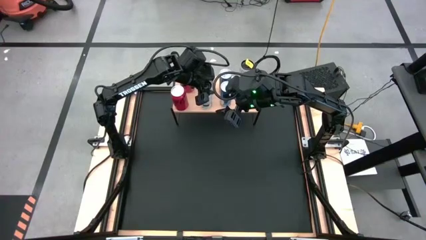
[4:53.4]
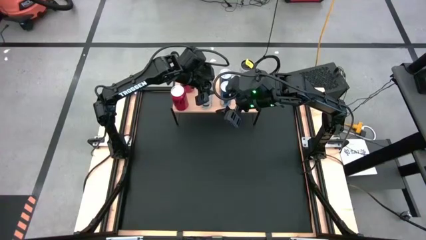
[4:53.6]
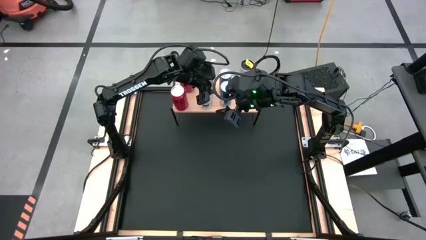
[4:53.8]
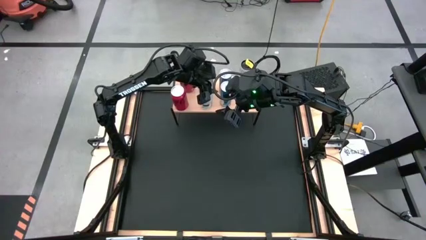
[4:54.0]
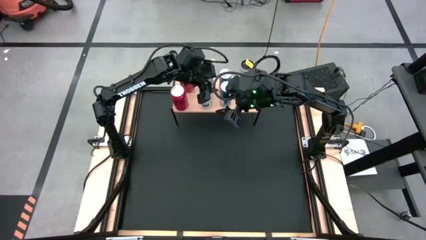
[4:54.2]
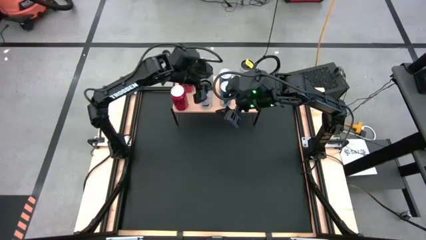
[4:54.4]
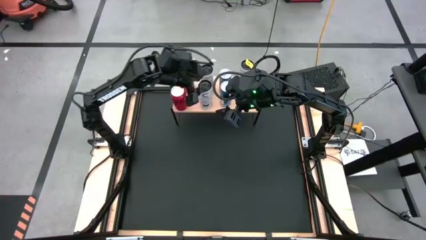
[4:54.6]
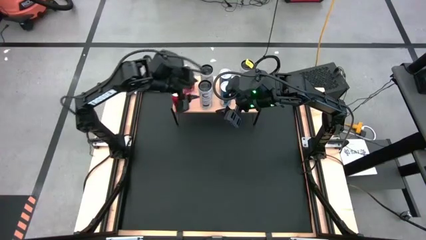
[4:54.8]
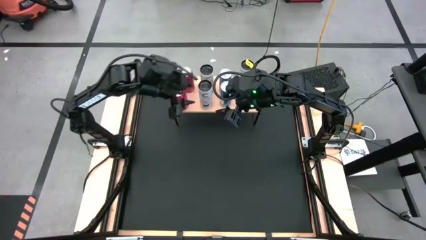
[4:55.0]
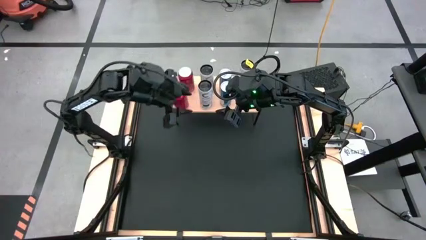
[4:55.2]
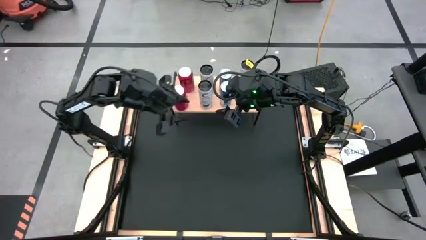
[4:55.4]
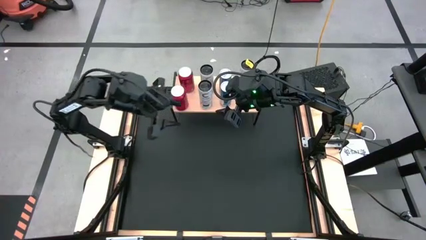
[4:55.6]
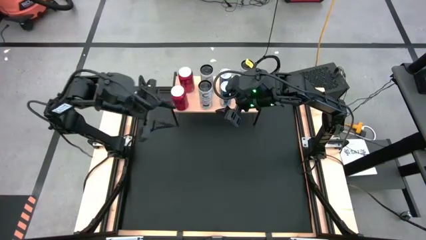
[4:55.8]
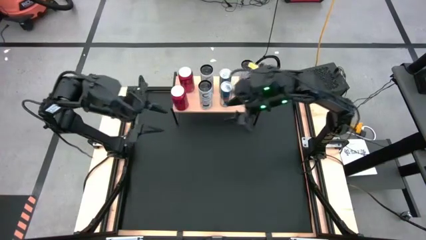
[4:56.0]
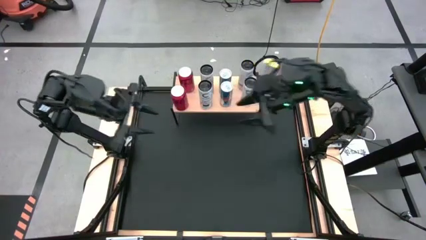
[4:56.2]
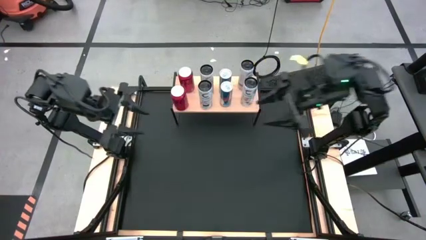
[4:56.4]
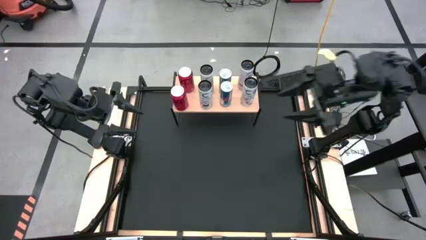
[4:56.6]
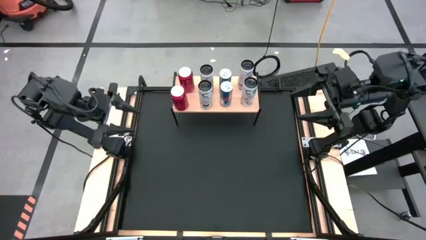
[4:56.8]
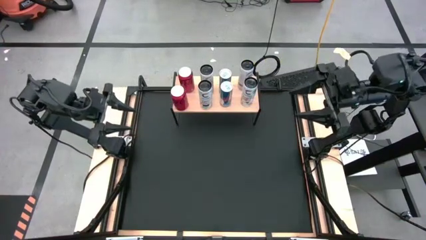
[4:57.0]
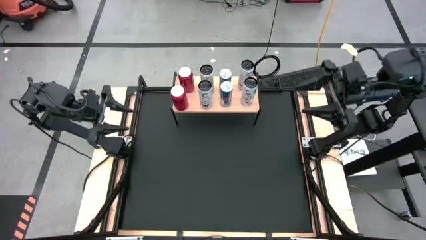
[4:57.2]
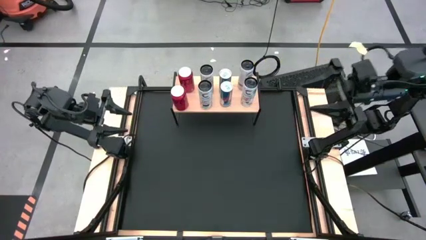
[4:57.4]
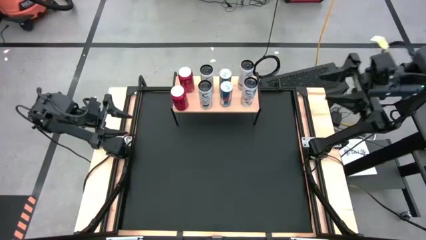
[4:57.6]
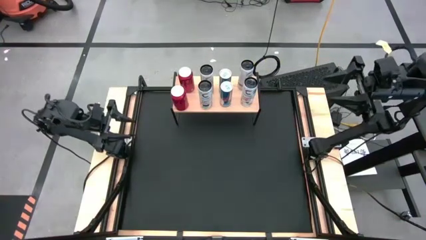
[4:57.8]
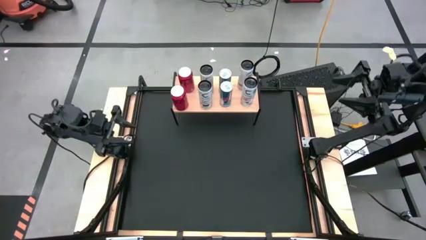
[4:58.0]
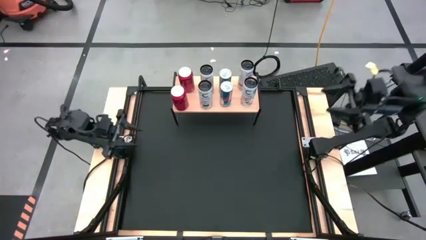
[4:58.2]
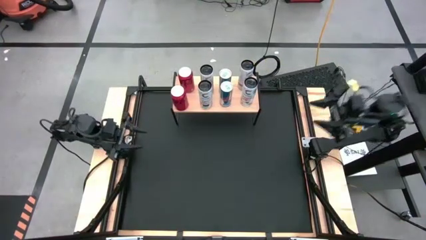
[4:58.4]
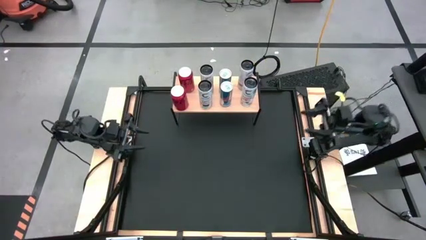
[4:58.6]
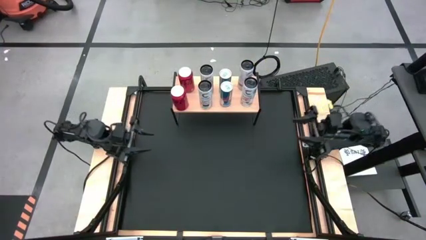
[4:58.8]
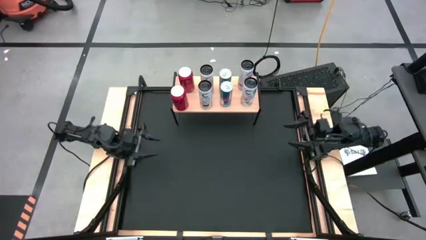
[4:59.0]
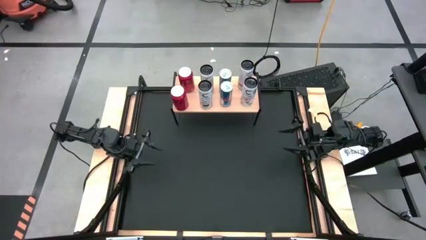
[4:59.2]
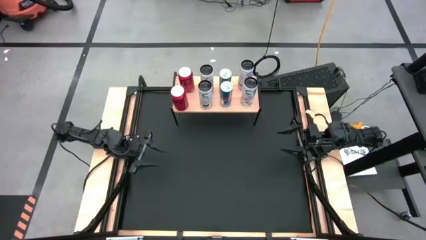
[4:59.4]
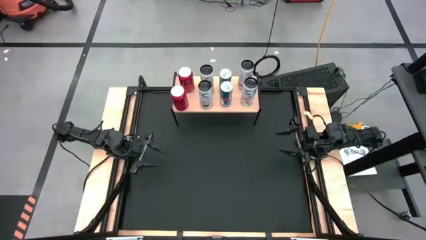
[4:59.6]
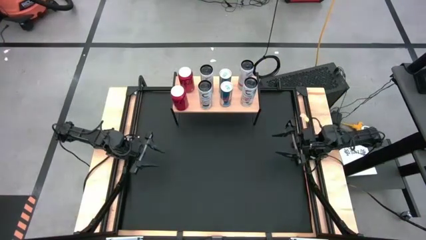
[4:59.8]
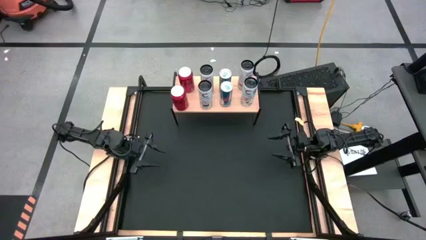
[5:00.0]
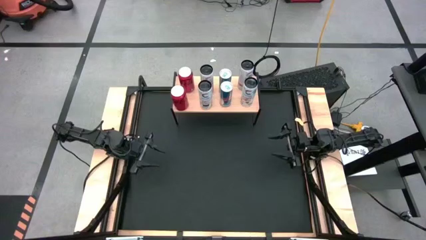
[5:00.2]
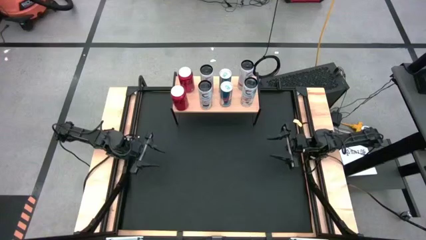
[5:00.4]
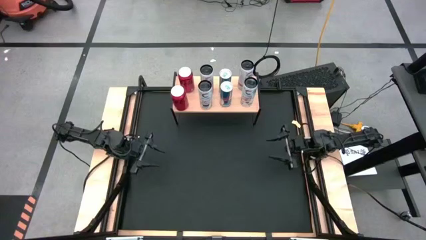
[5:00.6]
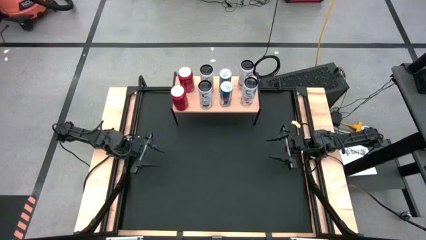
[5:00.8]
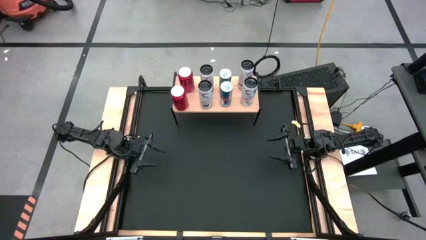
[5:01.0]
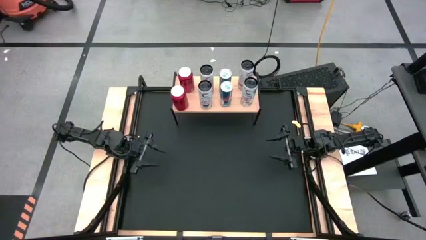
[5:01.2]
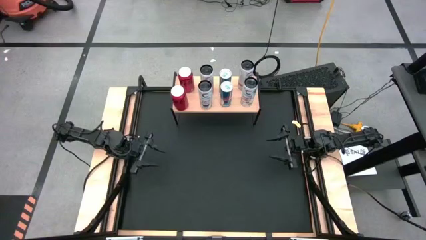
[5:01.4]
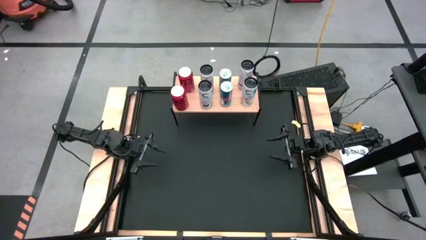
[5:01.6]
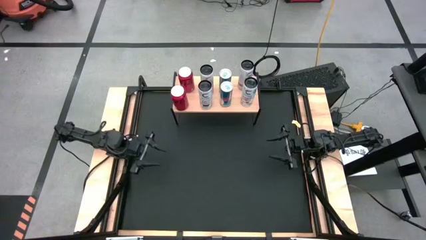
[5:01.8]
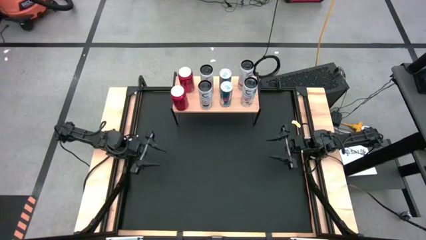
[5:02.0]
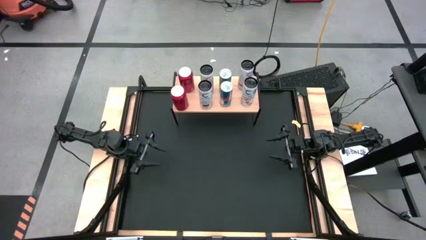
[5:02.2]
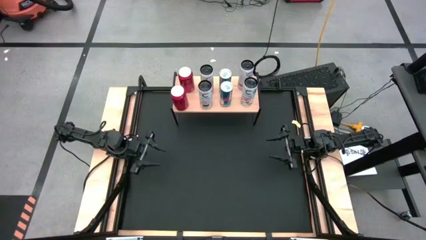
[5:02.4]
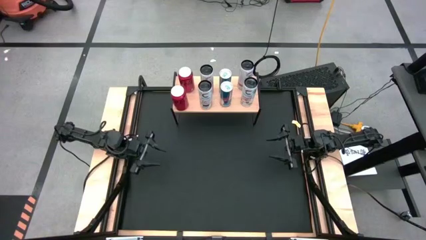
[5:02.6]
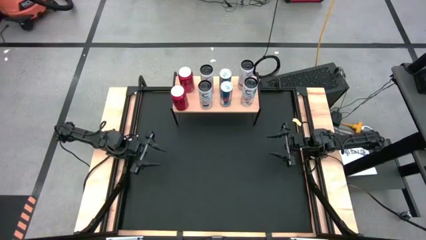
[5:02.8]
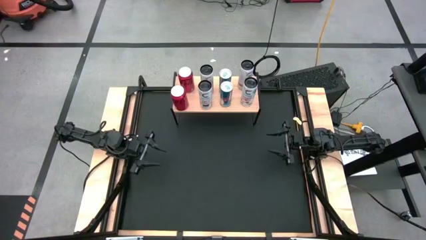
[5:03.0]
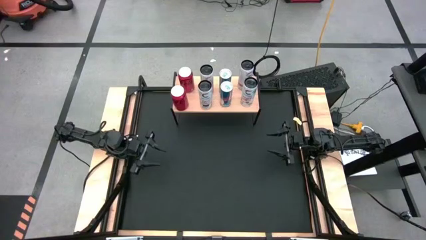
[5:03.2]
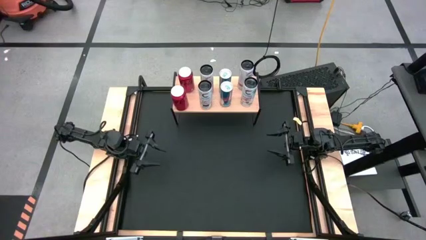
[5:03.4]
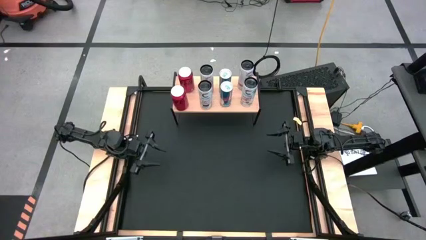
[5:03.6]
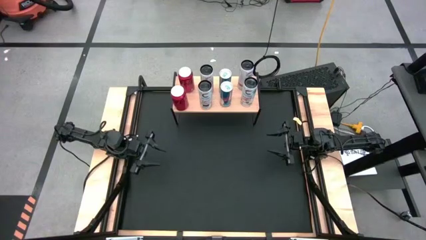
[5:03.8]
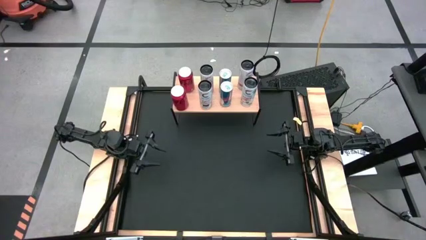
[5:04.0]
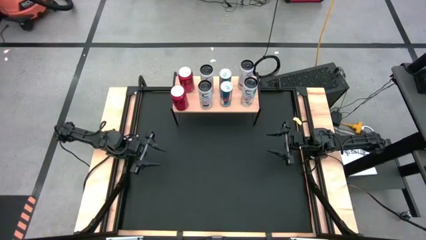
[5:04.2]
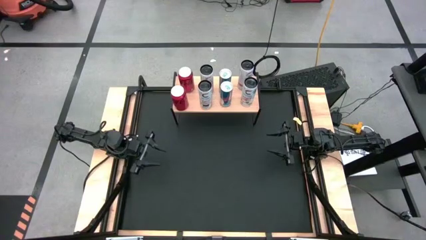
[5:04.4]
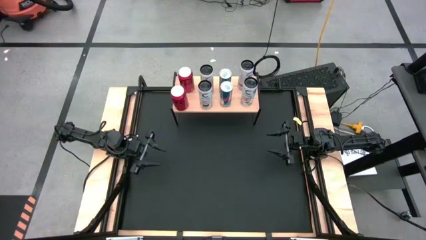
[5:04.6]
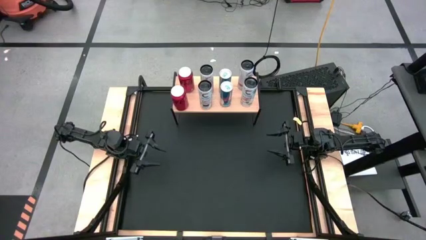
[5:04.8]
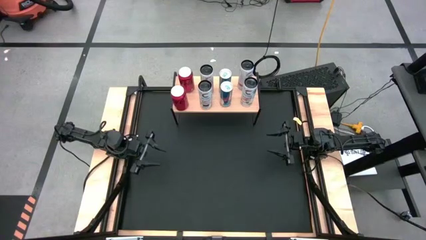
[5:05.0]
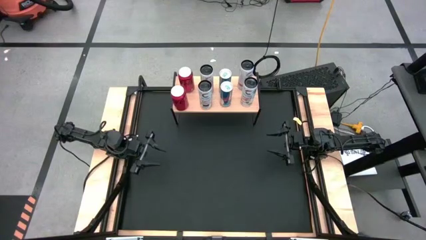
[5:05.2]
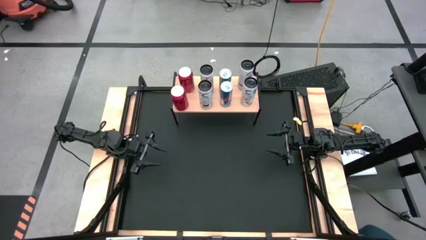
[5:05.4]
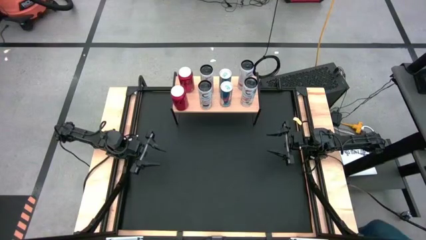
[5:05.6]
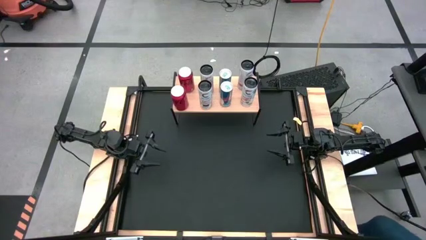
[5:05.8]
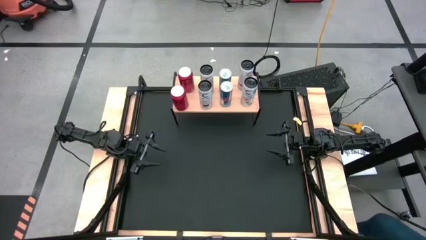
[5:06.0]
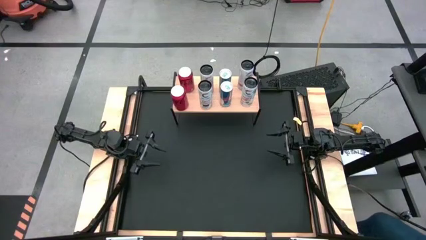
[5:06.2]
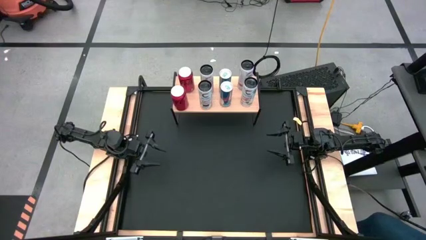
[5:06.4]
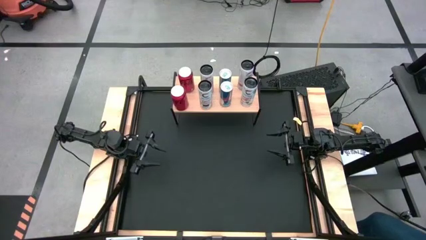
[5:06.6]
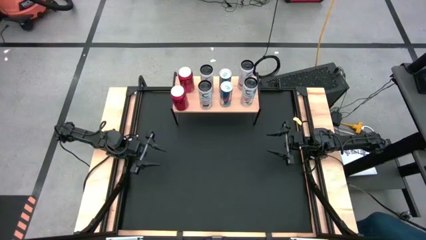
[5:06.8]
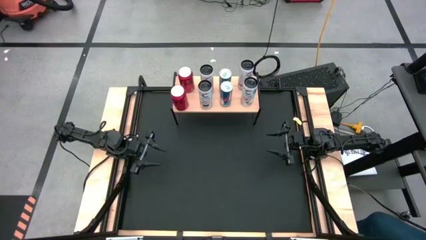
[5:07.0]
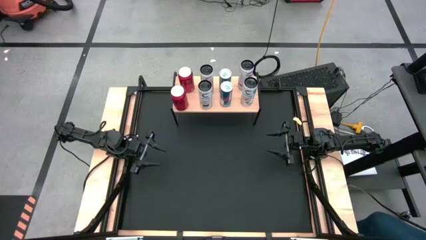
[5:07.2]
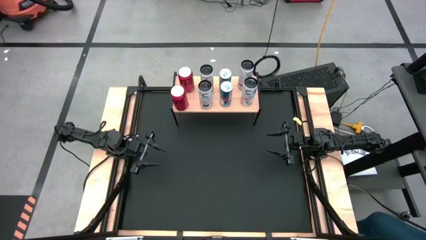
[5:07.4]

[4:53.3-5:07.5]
Task: Place canned beverage on shelf
Return to Home Position

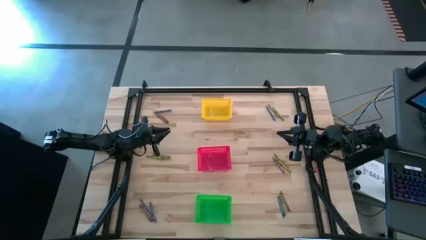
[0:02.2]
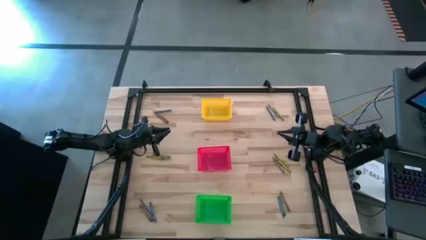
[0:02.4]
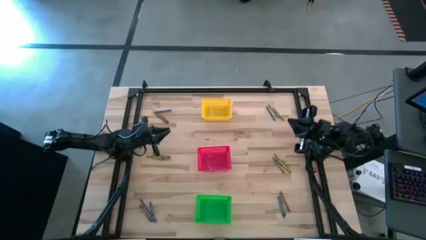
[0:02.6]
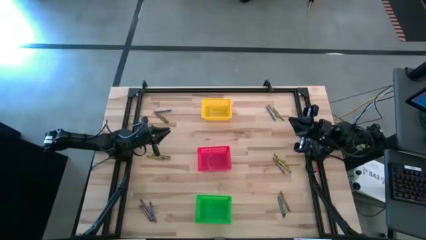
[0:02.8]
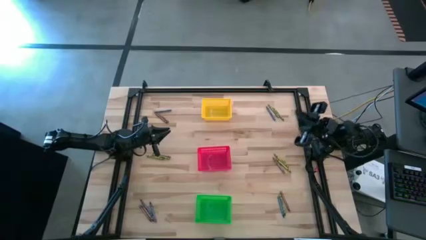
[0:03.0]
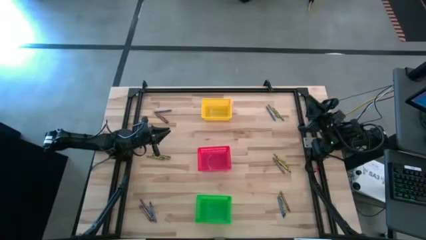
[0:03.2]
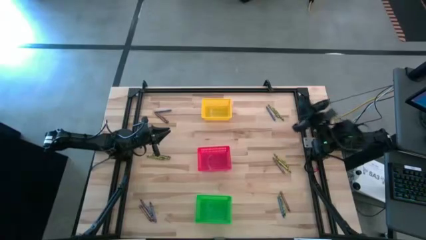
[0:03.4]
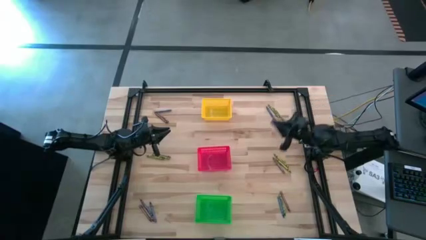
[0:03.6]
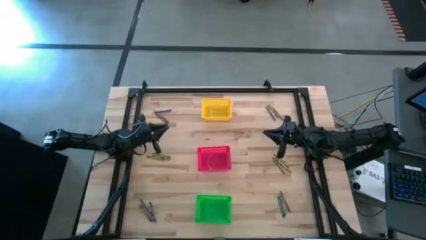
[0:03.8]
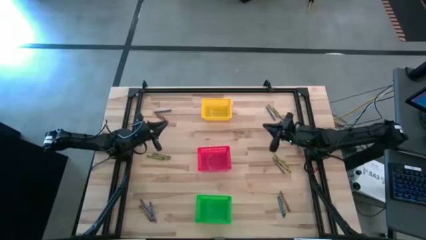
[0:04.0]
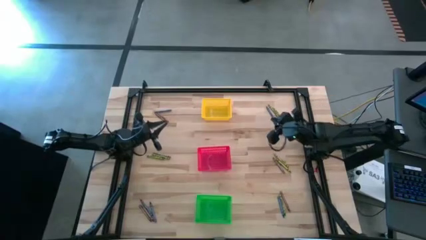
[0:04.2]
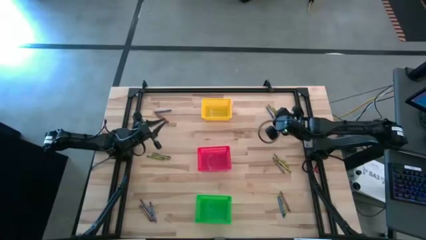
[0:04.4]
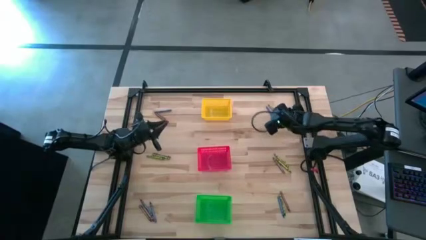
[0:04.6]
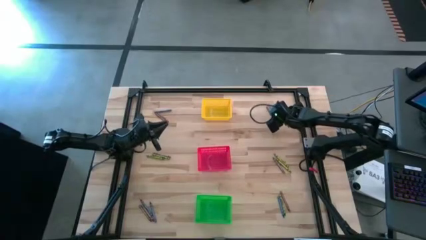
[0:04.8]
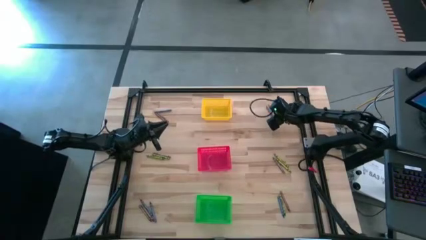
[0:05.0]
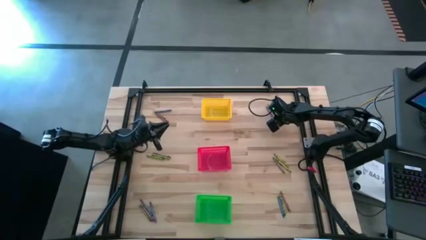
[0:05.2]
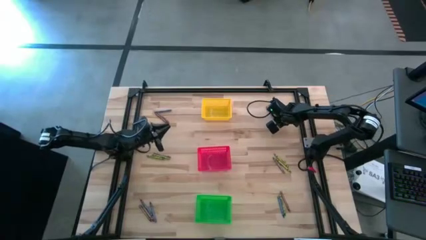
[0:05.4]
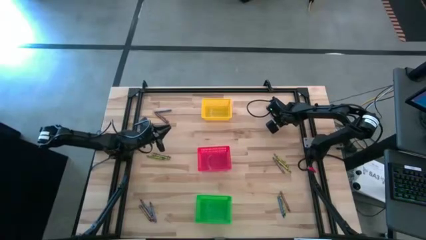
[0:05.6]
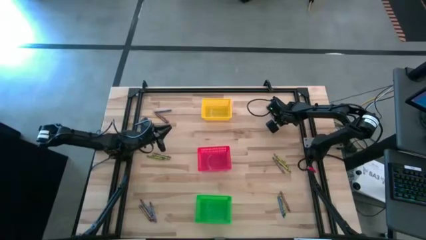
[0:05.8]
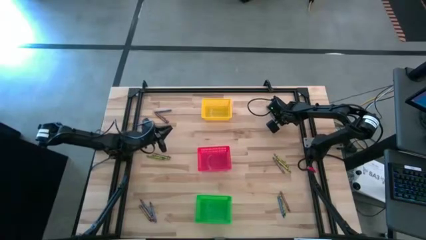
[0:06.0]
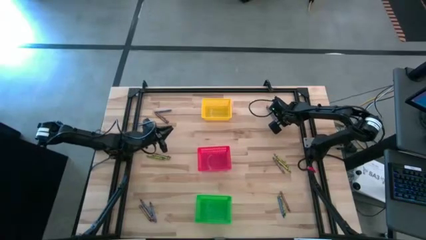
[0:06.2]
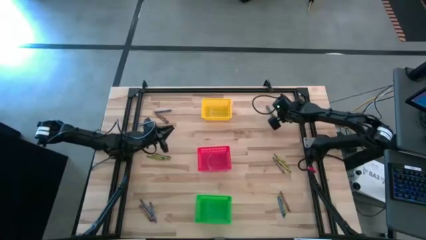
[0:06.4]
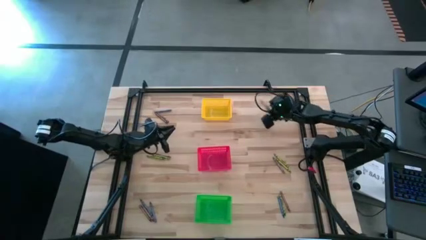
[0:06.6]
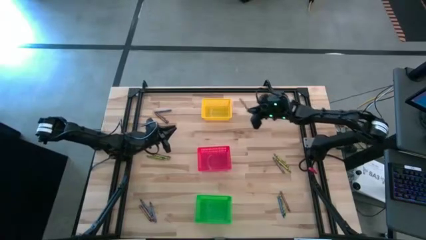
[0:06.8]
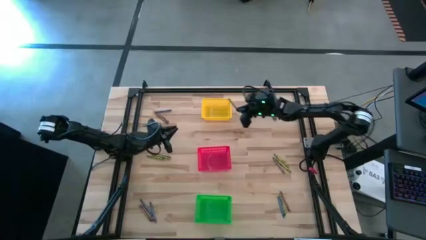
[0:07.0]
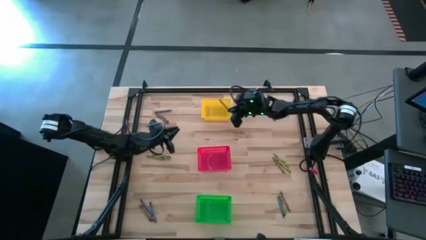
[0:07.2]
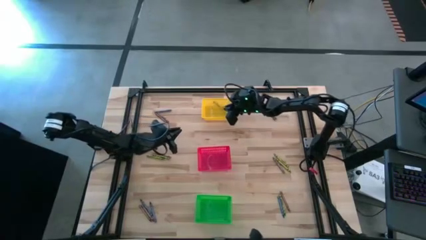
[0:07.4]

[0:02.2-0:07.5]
Task: Sort crayons
Put the green crayon into the yellow bin
